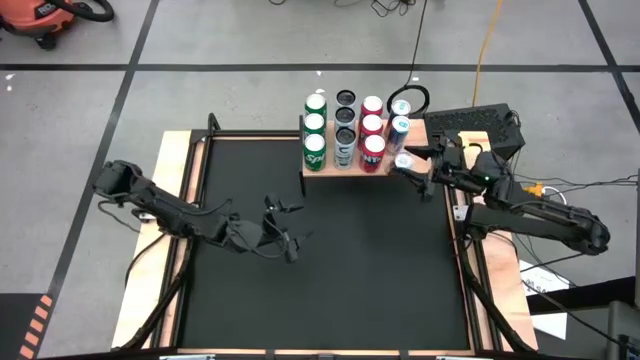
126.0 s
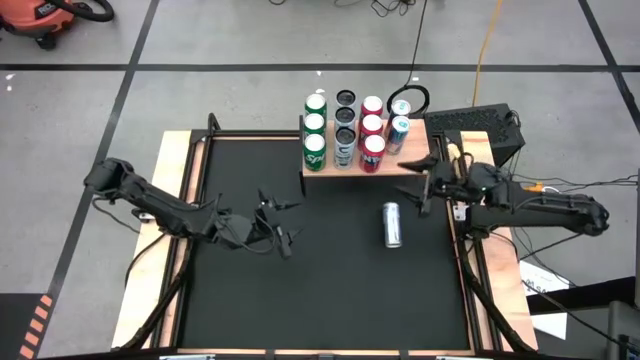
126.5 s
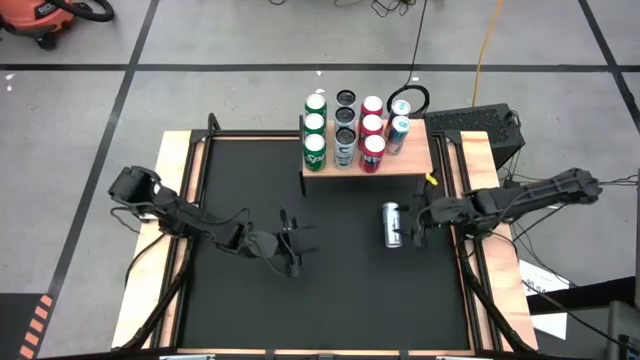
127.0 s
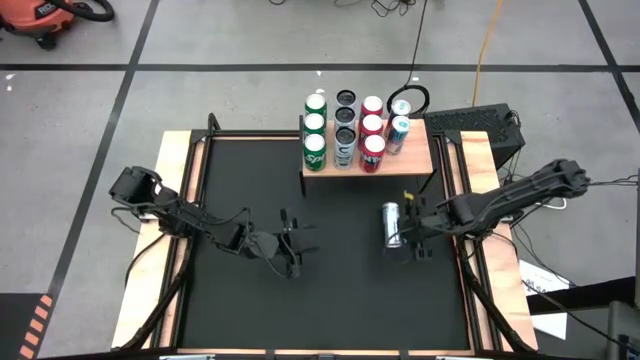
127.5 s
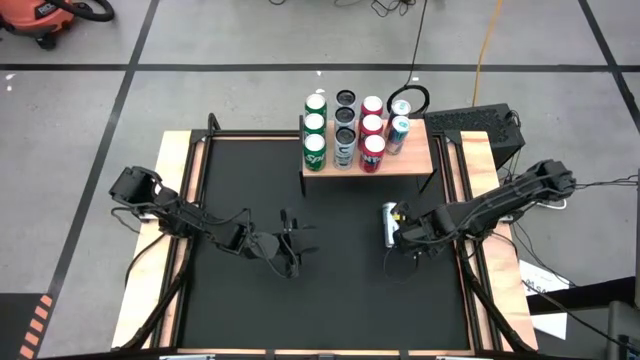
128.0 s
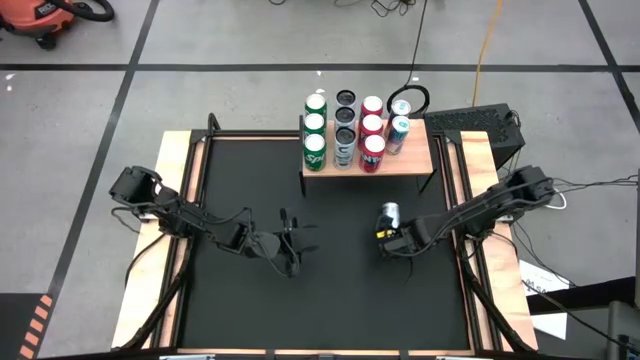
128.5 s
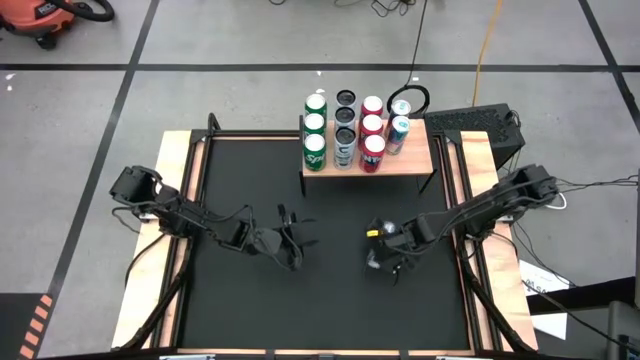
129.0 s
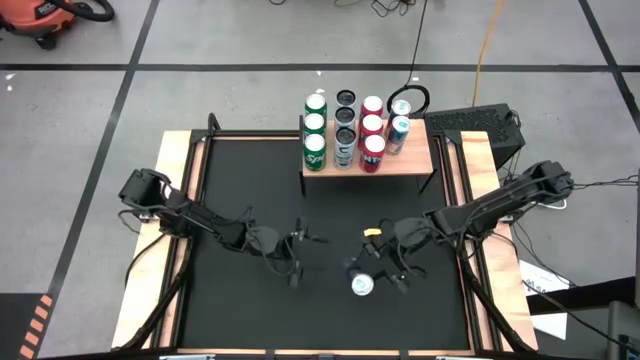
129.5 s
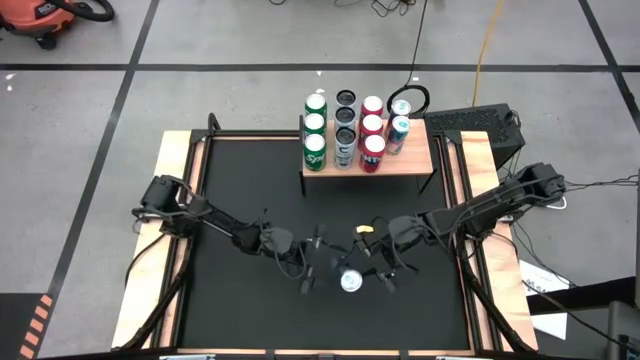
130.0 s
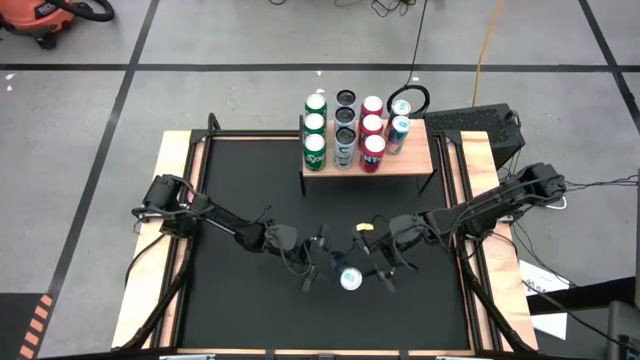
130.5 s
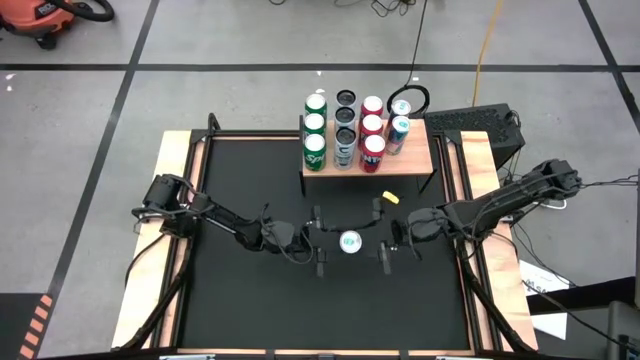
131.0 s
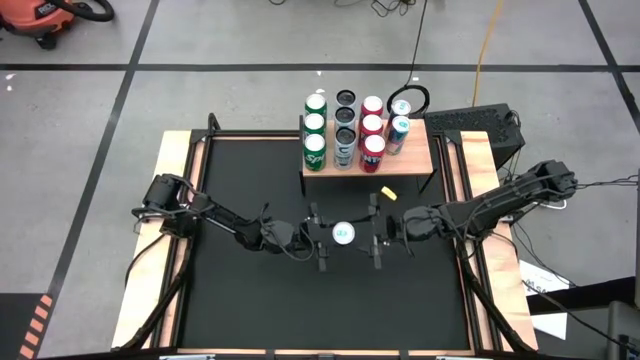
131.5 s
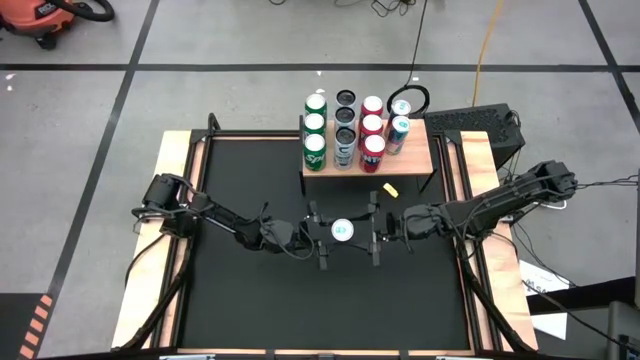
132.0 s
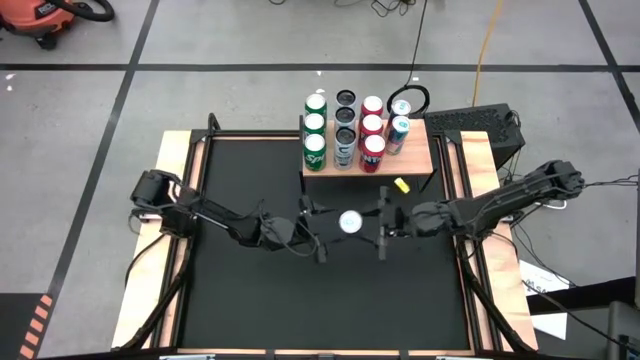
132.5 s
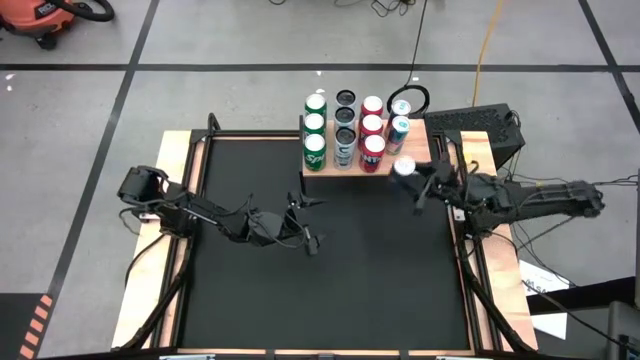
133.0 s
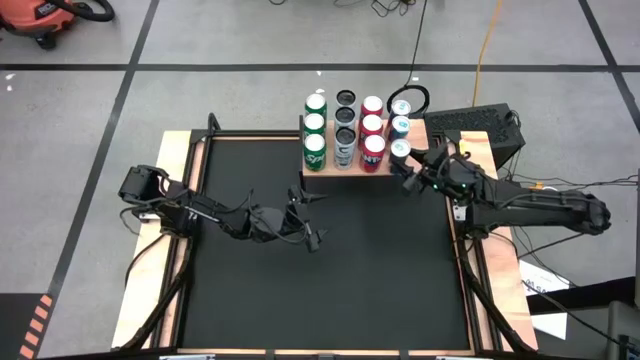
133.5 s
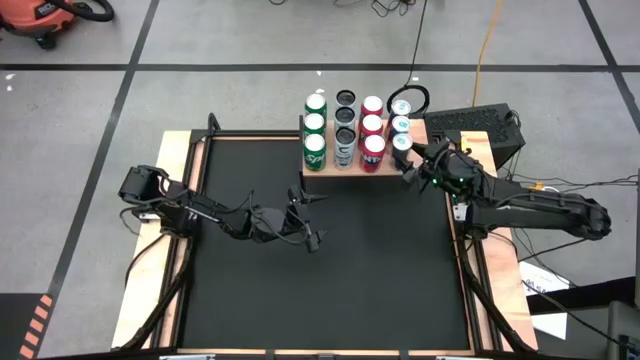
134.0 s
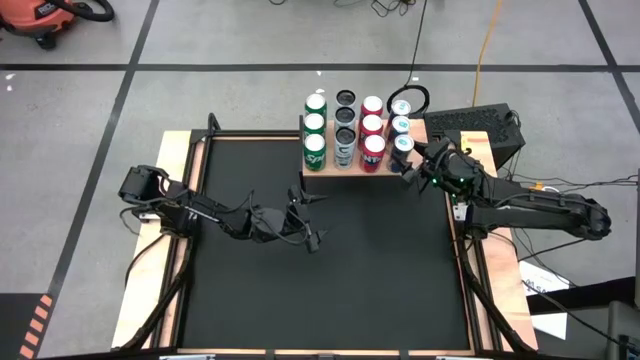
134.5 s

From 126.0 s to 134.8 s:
Task: Place canned beverage on shelf
Put the blue soda can on the shelf

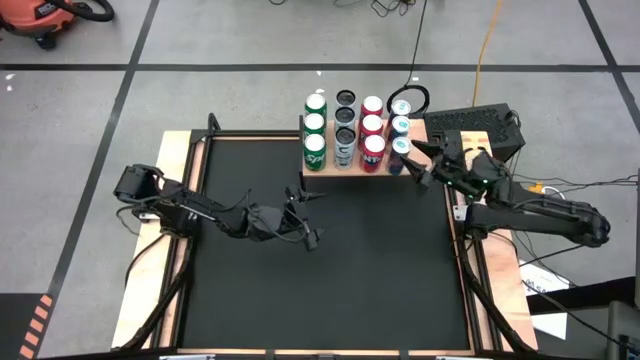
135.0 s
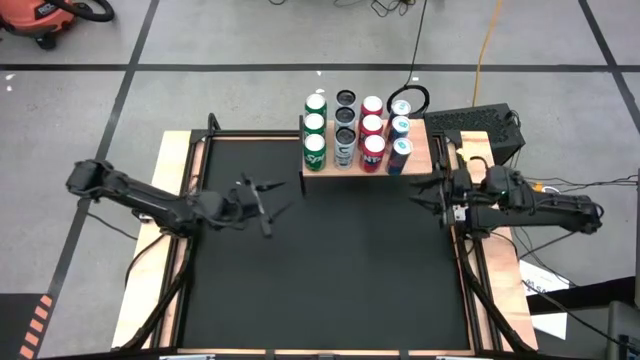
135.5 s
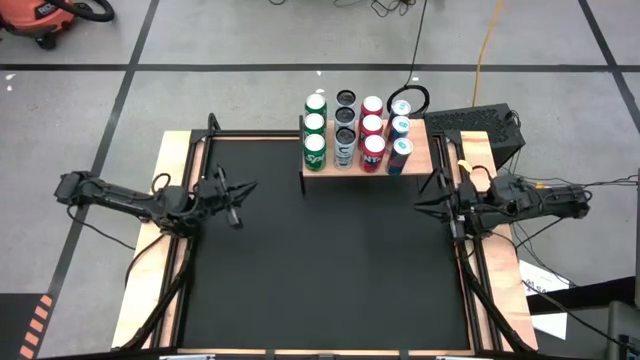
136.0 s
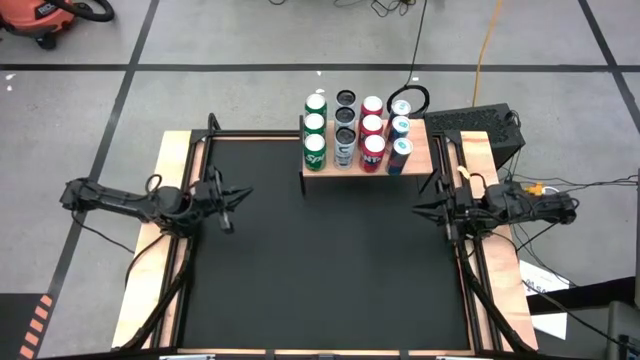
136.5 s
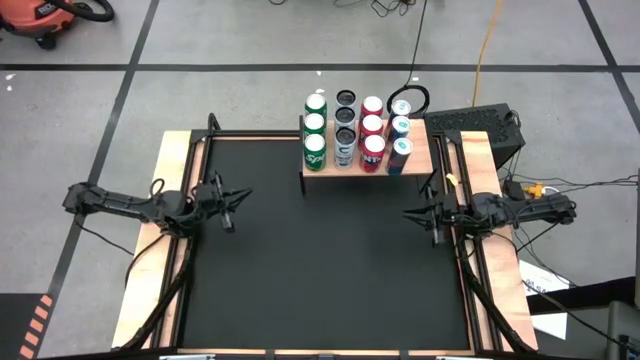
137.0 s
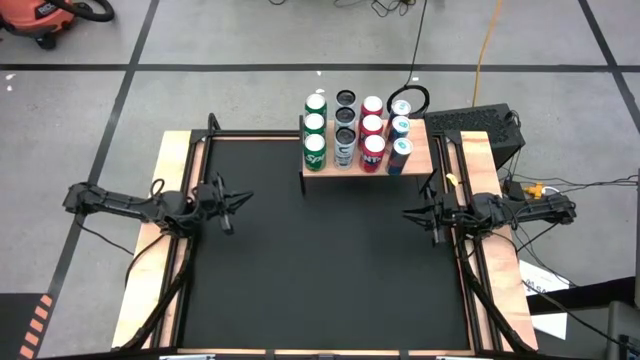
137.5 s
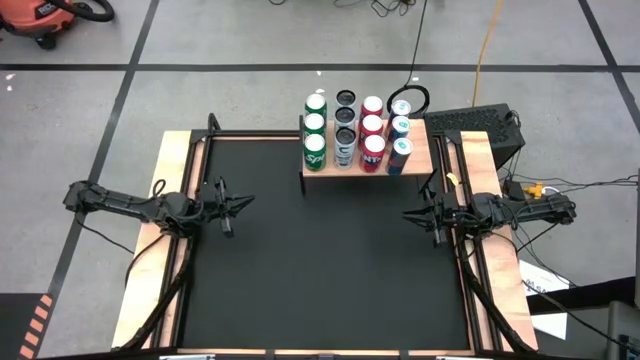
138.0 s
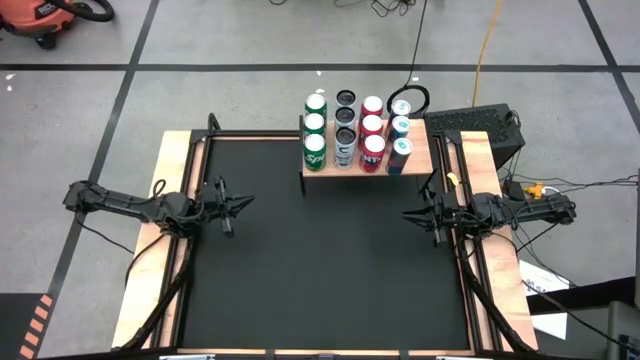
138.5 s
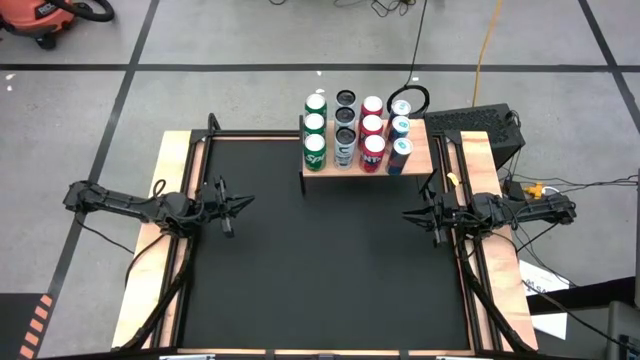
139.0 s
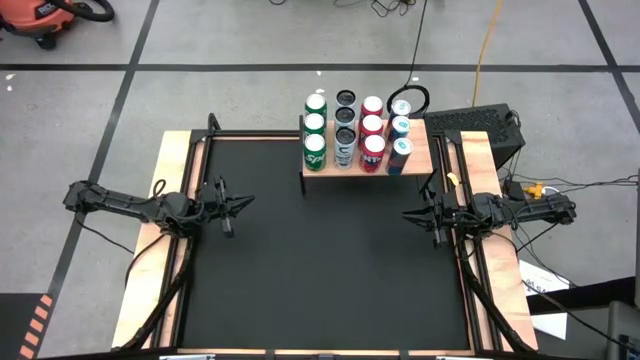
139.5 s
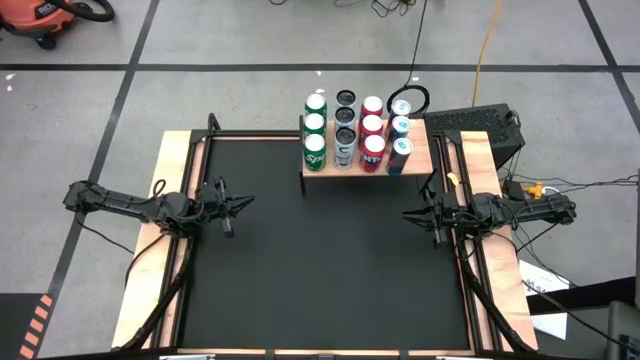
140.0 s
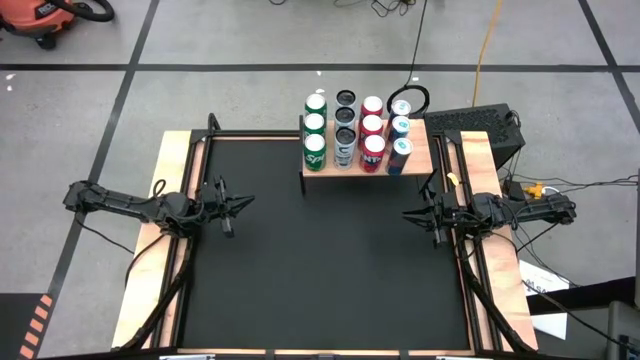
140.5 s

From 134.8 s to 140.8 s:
Return to Home Position

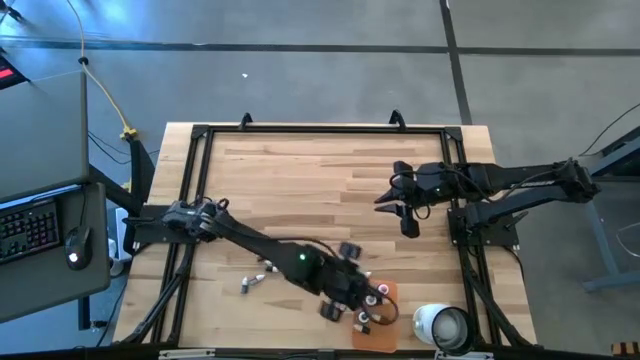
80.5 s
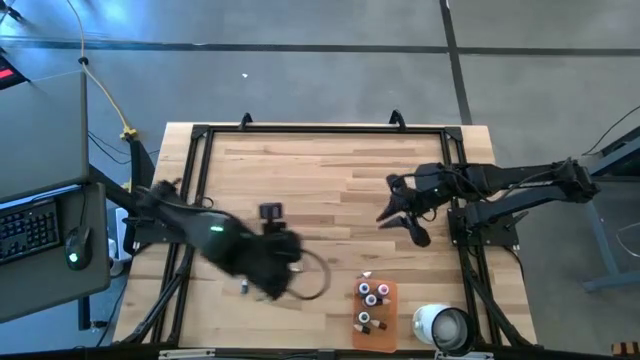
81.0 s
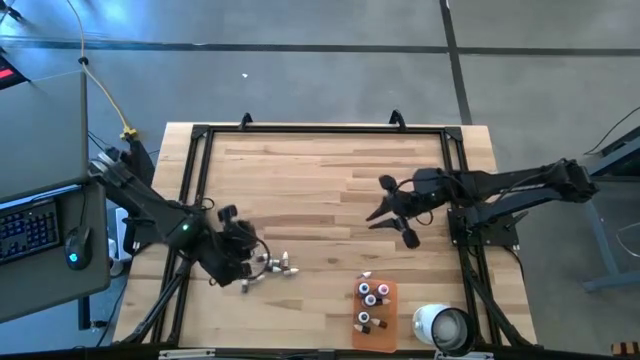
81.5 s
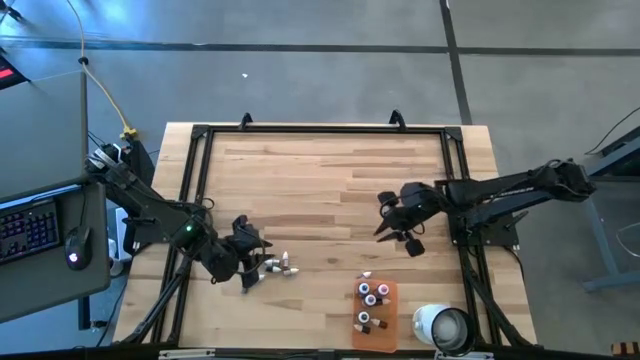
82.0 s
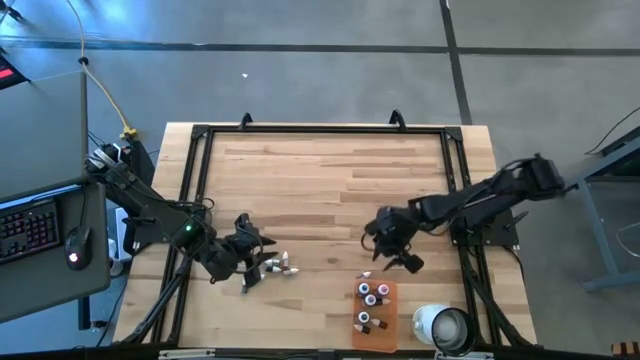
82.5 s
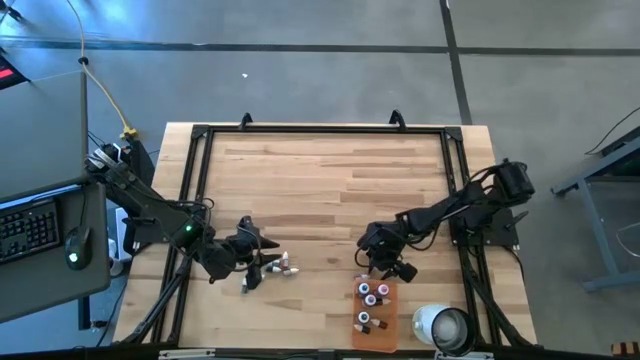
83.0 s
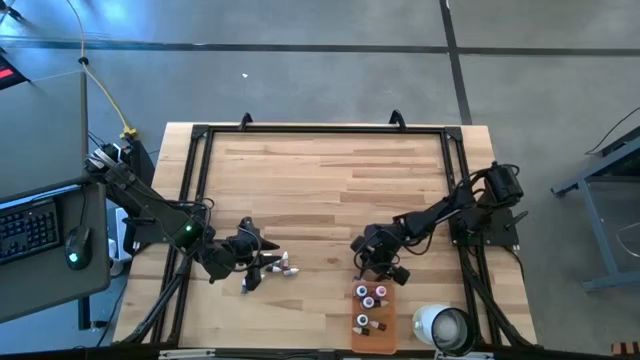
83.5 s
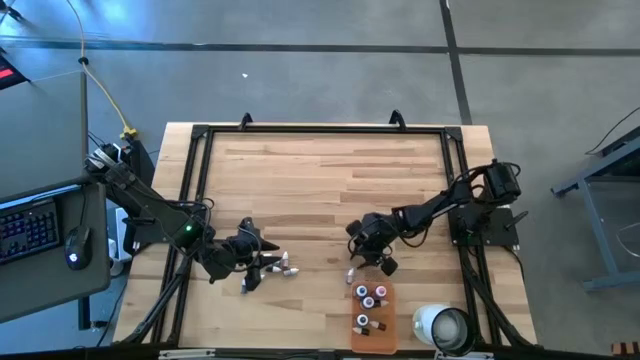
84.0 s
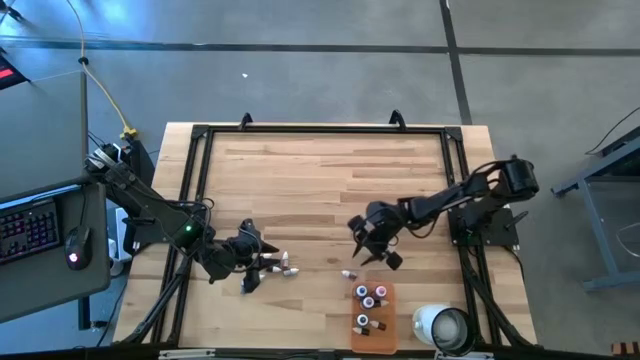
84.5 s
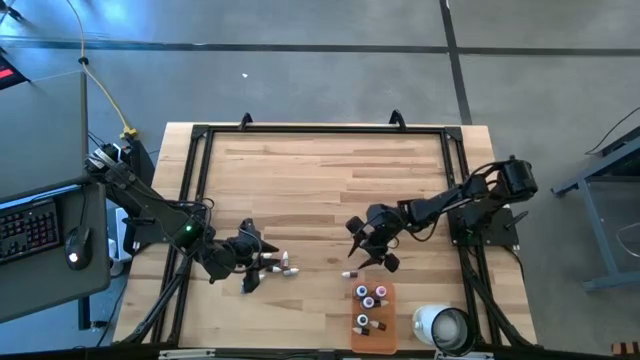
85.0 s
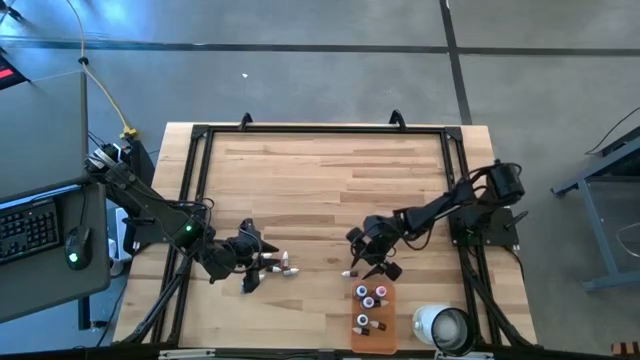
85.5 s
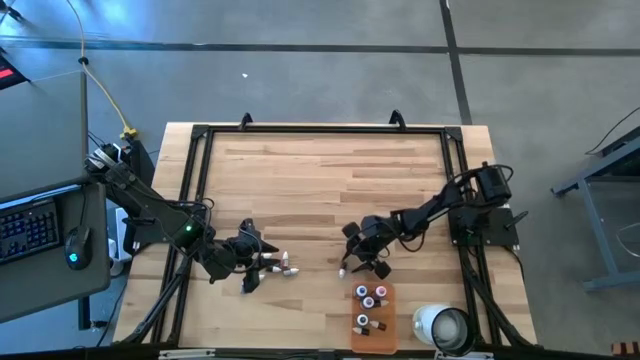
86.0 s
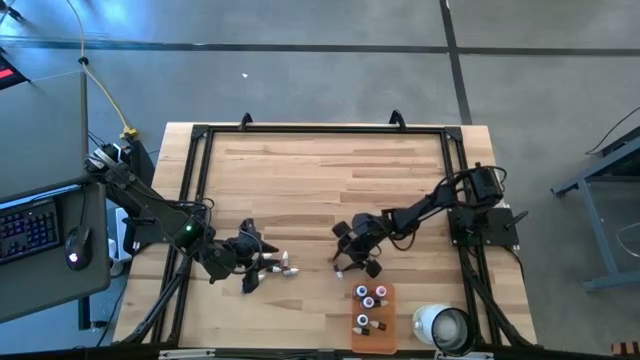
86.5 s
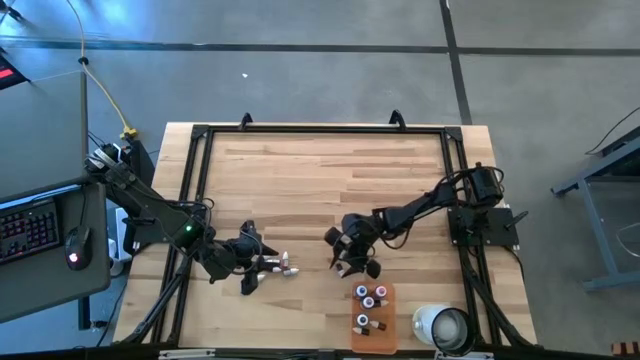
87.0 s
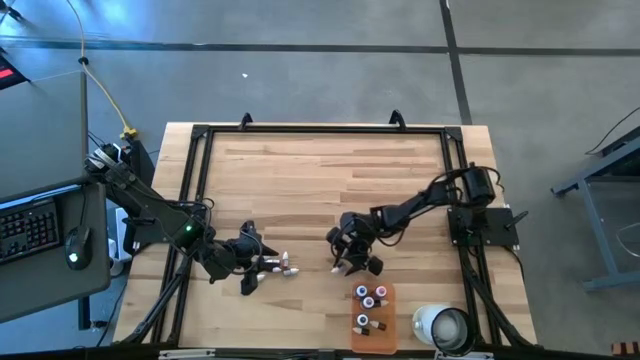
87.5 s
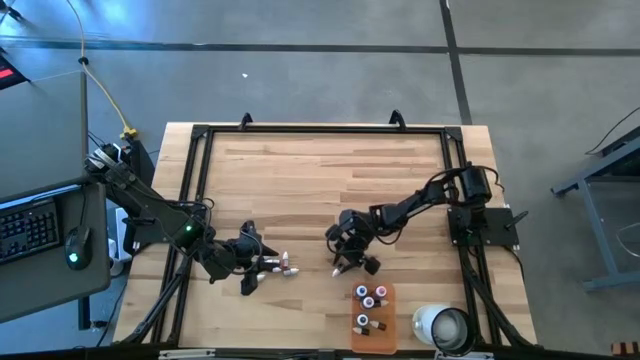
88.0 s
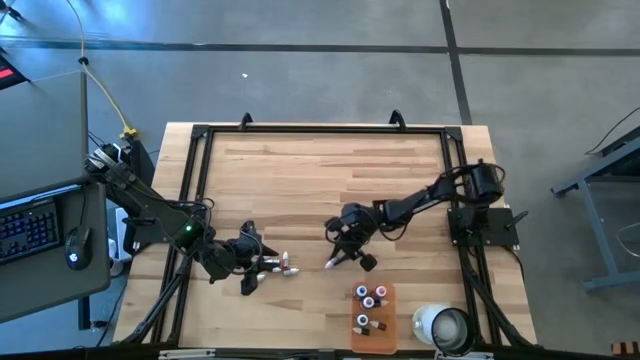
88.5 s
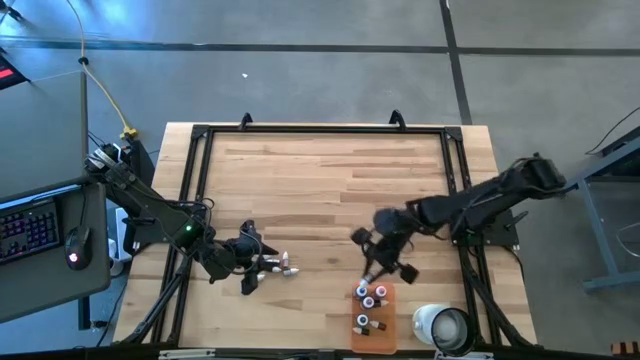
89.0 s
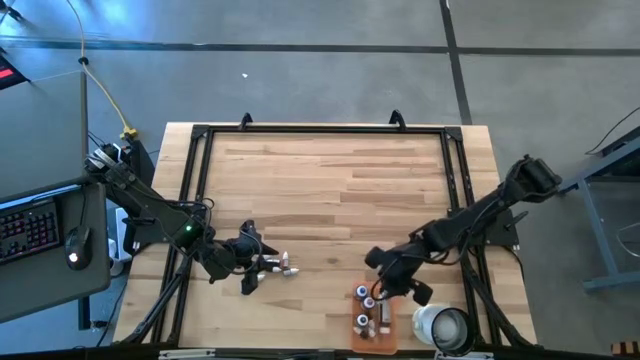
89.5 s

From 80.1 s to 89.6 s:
Task: Pick & Place food coloring
Put the right small purple food coloring bottle into the orange bin
